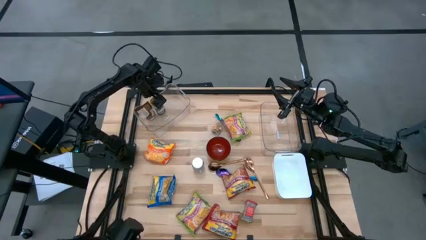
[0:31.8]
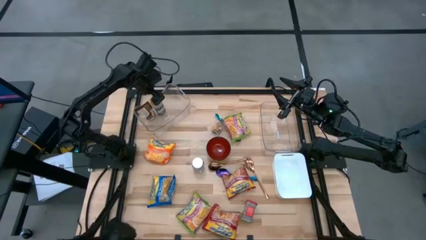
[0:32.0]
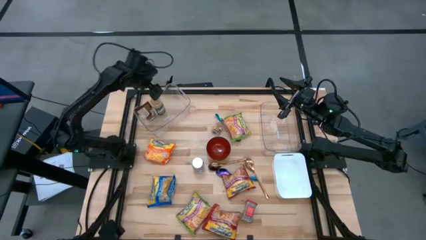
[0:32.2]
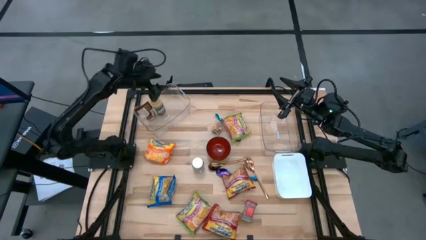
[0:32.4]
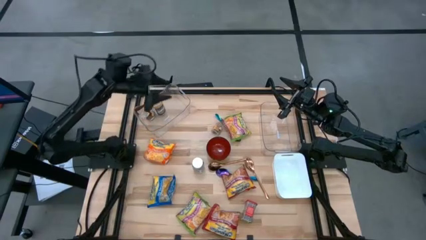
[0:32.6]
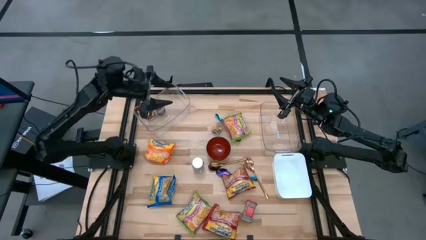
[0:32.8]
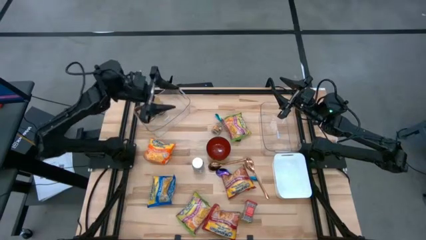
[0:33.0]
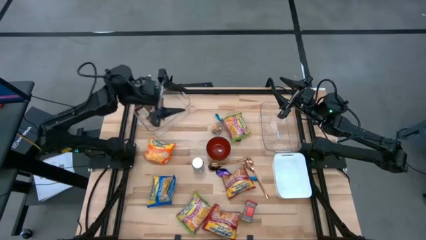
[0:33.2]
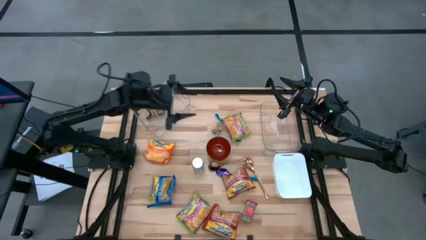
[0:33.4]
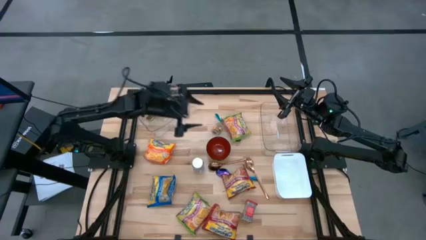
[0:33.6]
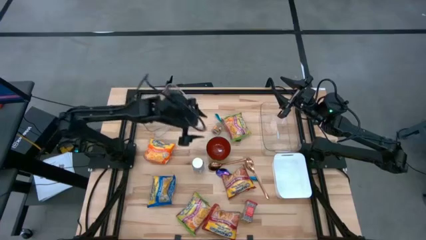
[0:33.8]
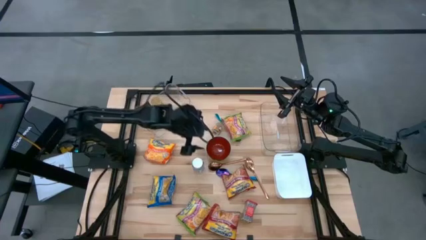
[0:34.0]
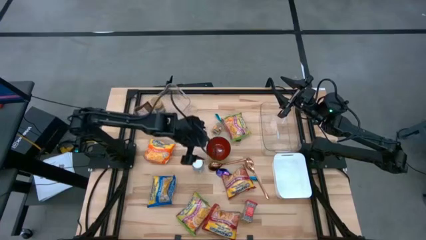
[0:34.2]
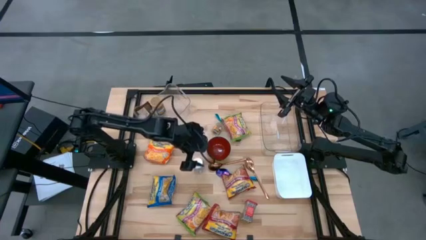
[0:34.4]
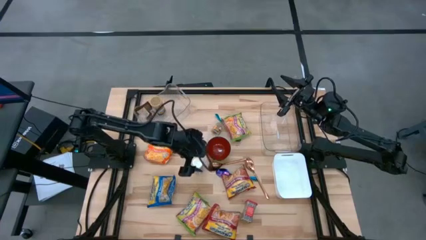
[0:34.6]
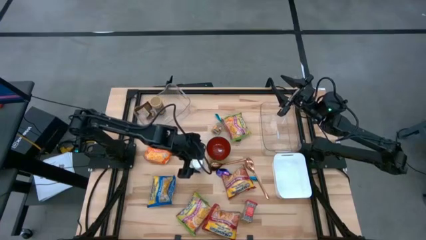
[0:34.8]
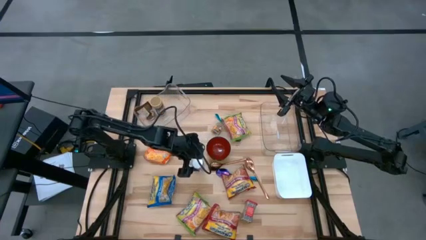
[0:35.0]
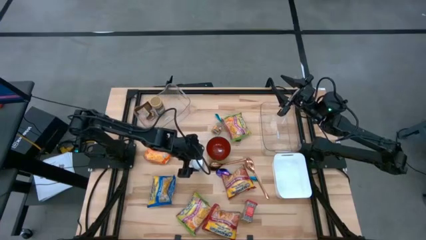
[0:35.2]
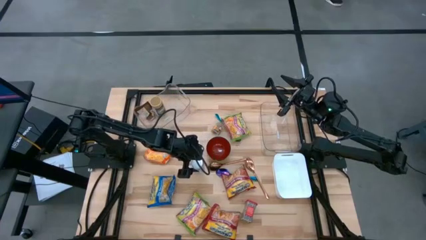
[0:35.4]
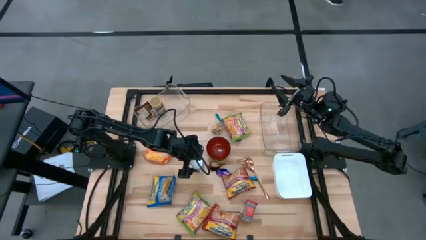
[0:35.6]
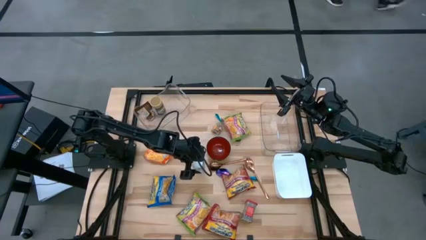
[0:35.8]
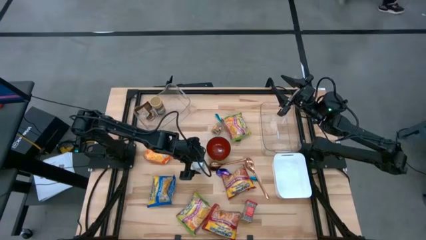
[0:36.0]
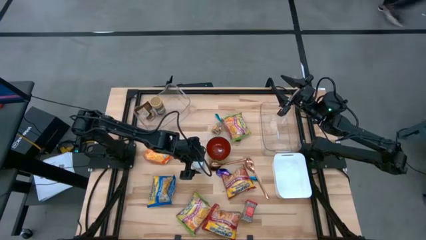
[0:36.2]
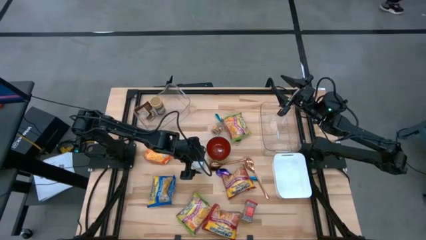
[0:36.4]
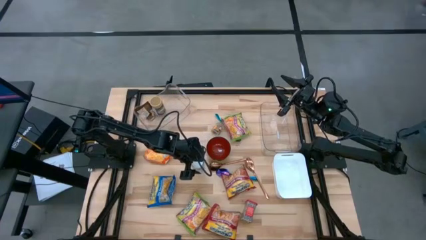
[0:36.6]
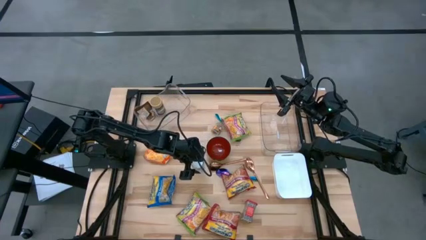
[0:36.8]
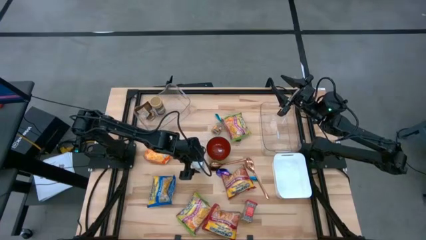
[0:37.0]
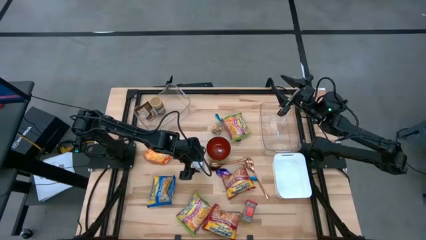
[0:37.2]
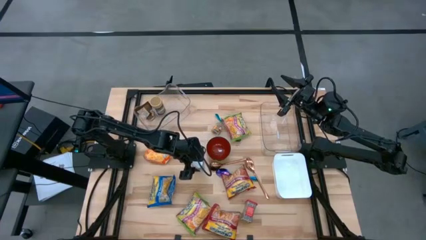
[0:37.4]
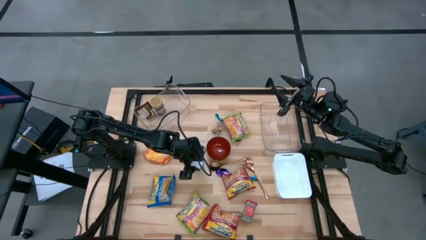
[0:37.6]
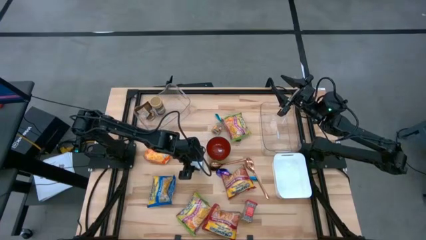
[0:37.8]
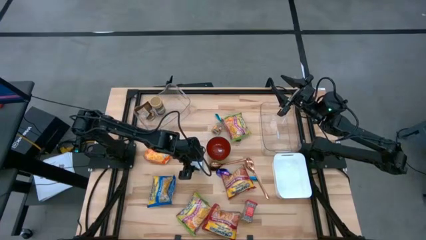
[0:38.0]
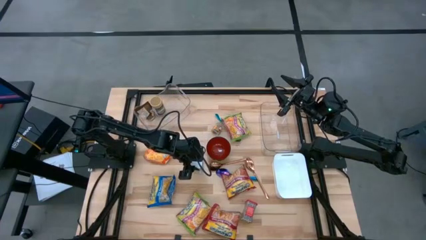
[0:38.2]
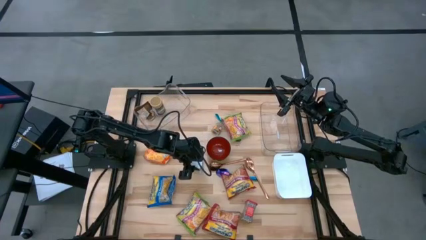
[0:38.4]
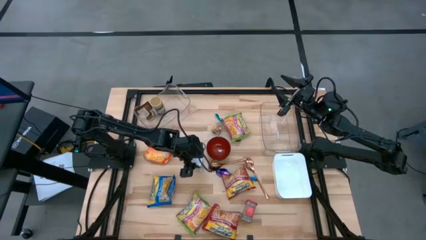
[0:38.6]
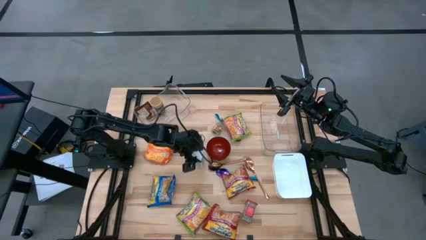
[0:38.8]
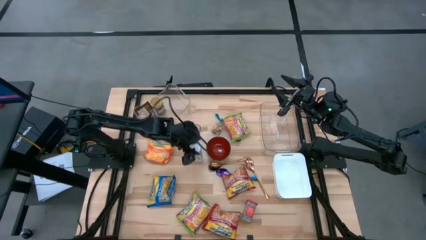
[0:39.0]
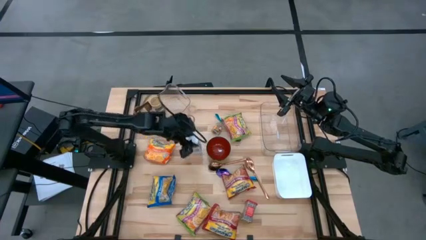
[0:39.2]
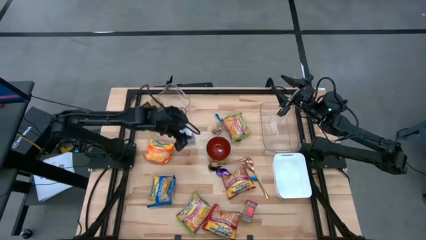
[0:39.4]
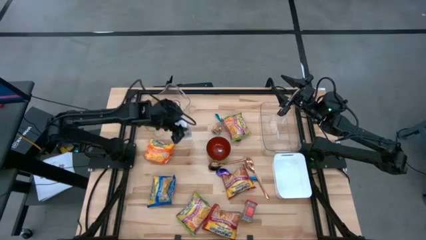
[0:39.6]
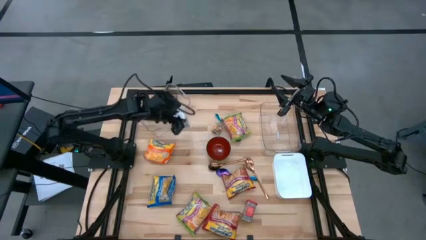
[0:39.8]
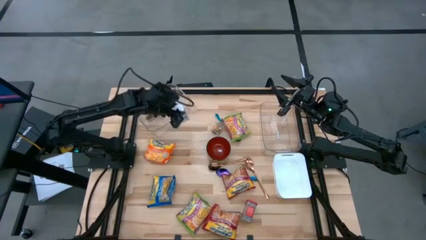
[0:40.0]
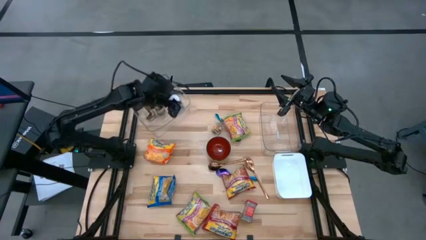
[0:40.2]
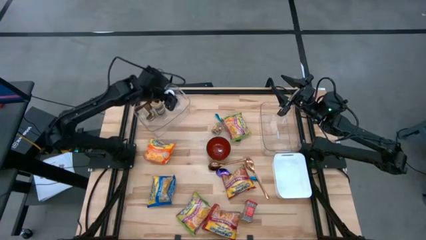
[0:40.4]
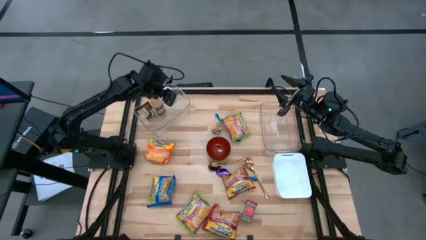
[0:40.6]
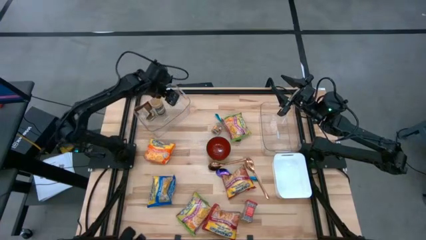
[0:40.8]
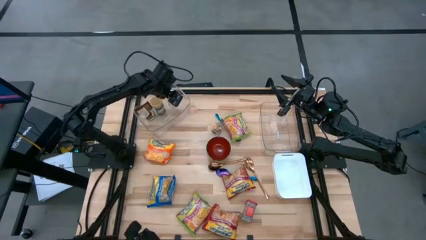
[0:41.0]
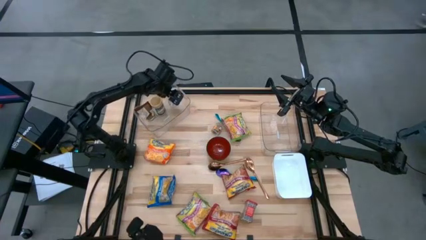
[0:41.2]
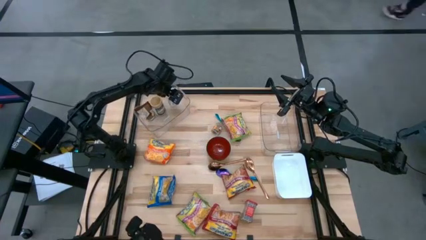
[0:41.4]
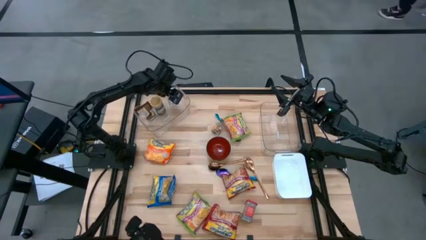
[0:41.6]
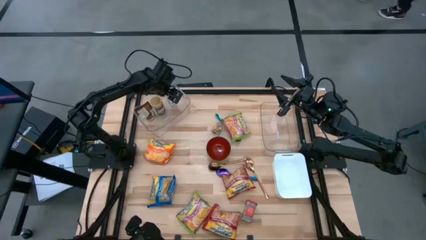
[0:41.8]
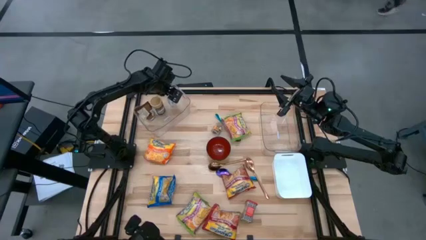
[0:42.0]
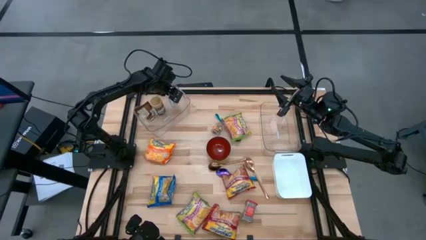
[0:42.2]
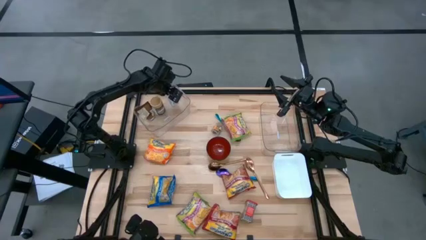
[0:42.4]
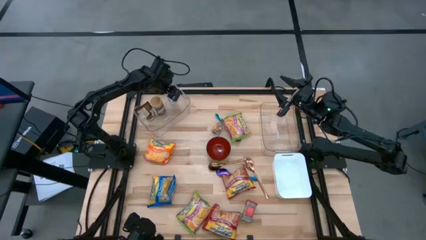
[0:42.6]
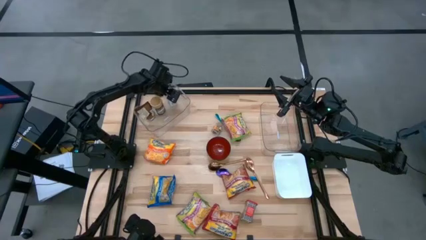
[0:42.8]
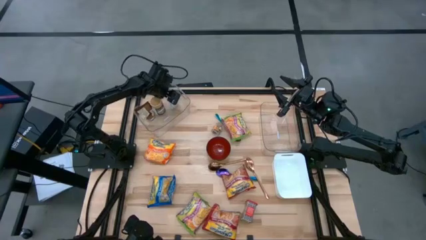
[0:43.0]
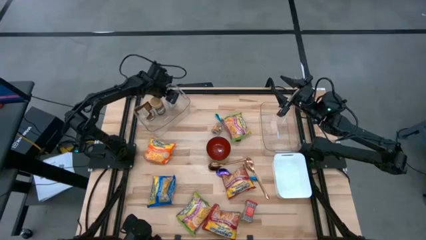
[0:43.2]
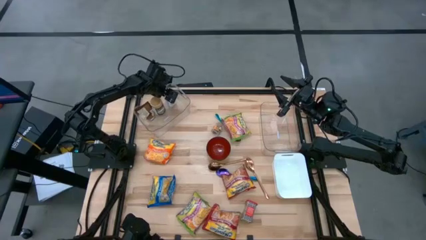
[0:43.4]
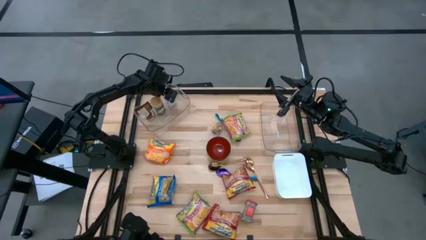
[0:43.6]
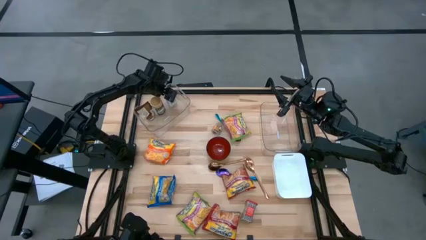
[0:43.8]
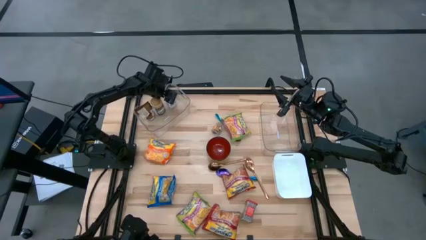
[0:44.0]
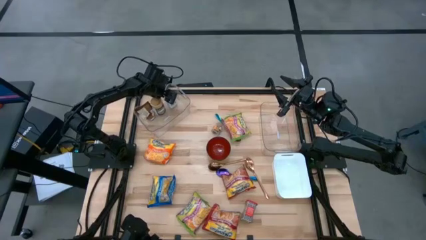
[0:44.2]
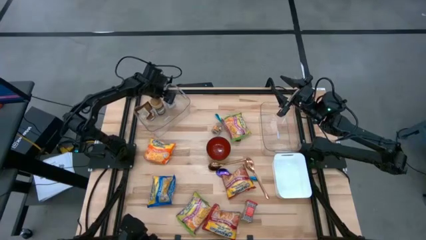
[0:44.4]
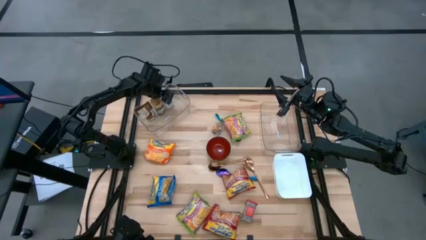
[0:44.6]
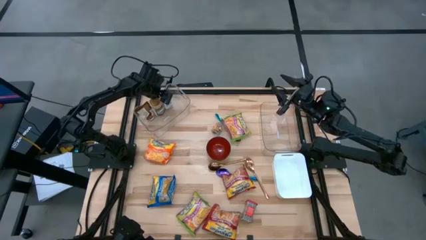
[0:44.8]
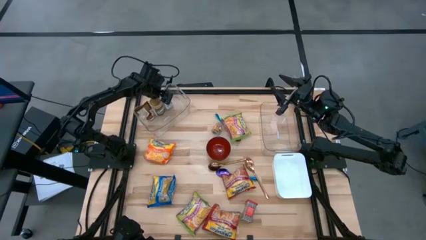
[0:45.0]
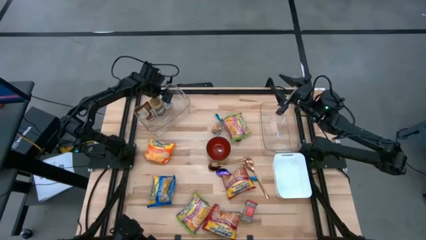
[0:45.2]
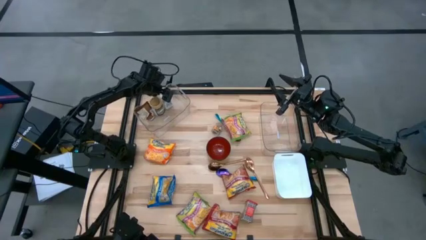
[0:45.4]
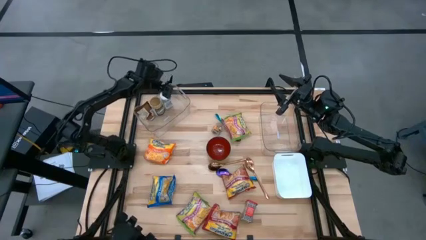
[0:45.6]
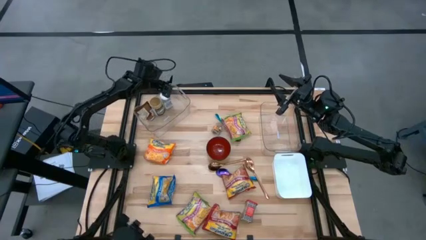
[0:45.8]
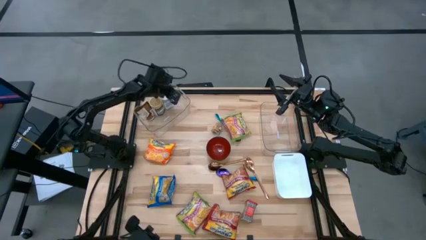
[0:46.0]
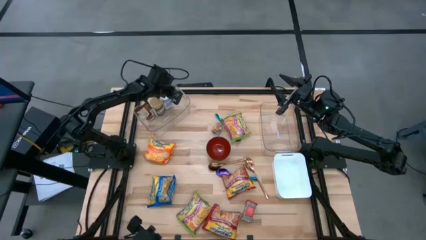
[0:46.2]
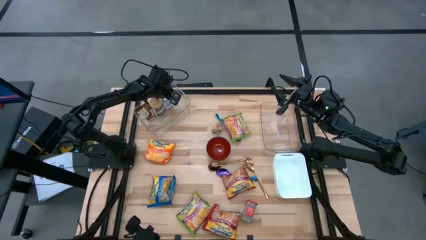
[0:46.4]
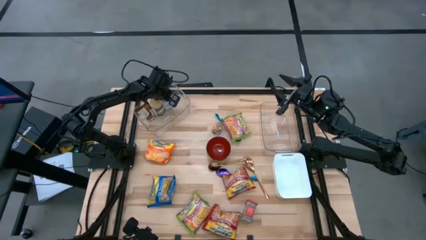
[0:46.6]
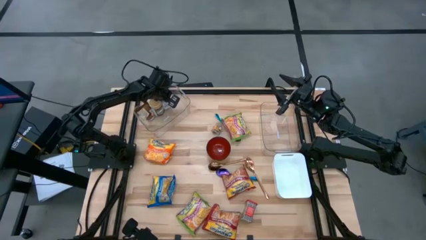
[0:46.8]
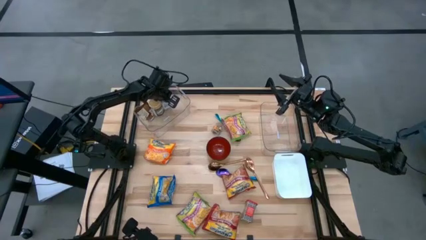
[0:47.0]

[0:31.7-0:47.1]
Task: Pick & Place Food Item
Put the white seasoning bottle into the left transparent bin

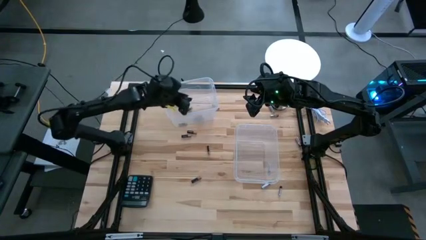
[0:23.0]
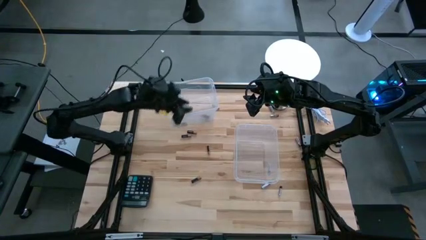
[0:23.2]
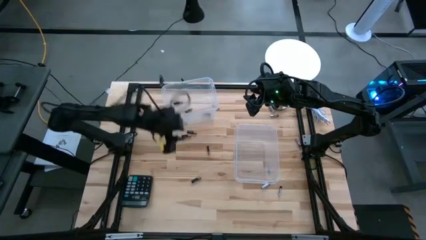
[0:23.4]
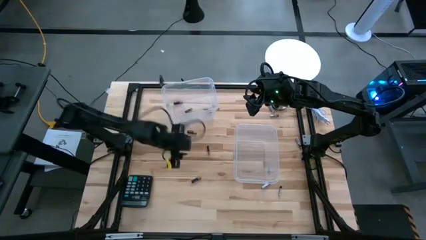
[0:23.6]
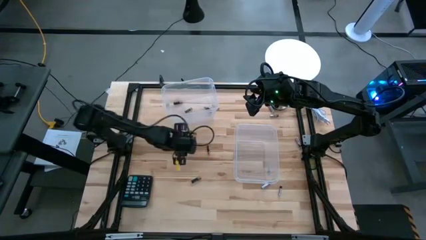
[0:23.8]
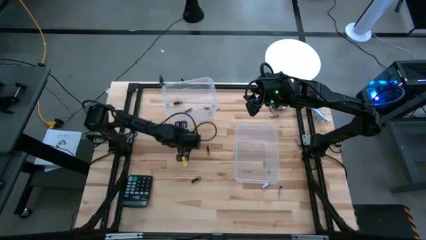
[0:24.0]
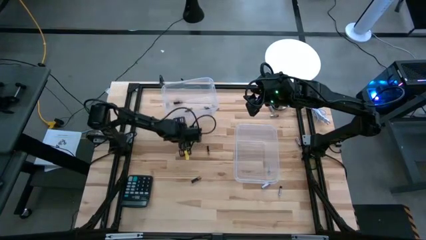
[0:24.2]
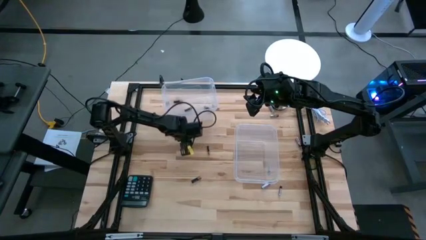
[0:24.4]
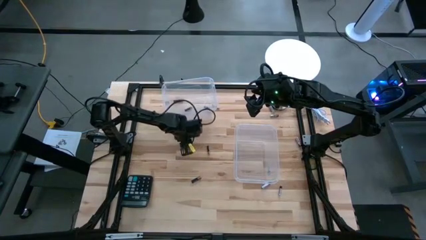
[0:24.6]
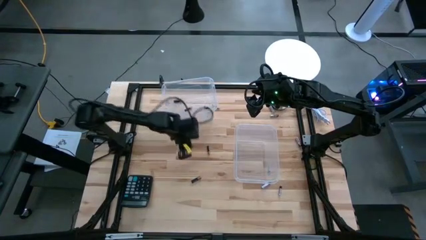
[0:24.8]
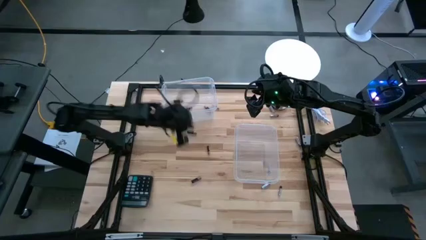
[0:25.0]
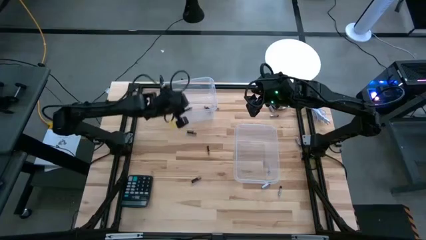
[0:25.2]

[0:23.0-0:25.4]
Task: Sort batteries
Put the black battery into the left transparent bin

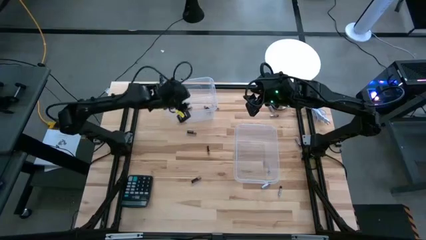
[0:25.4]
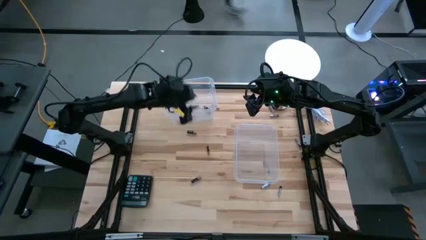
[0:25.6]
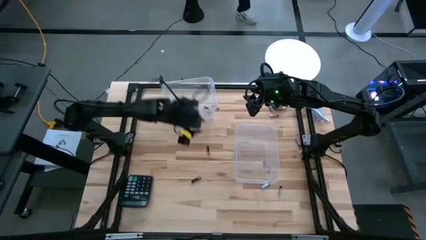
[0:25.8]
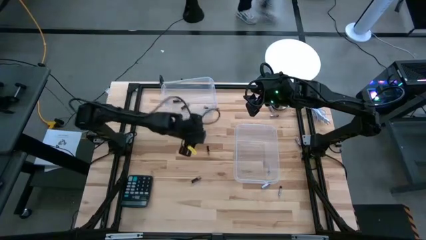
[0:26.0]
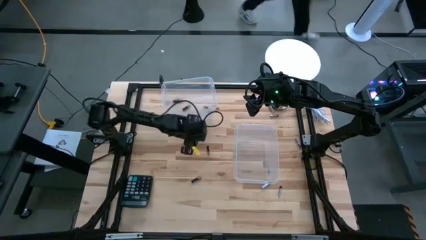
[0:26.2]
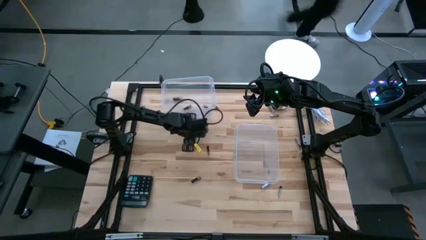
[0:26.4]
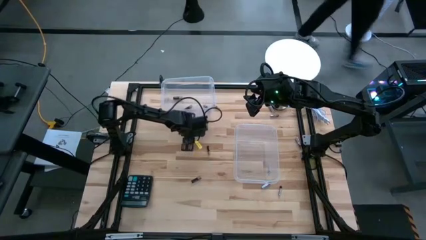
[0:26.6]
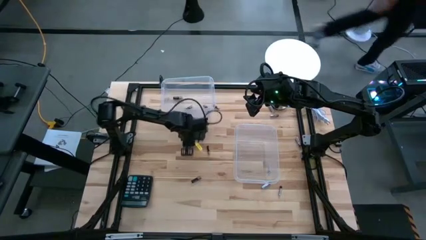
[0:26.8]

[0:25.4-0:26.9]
Put the black battery into the left transparent bin
